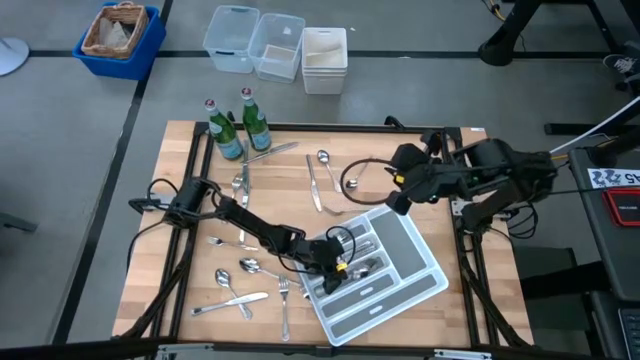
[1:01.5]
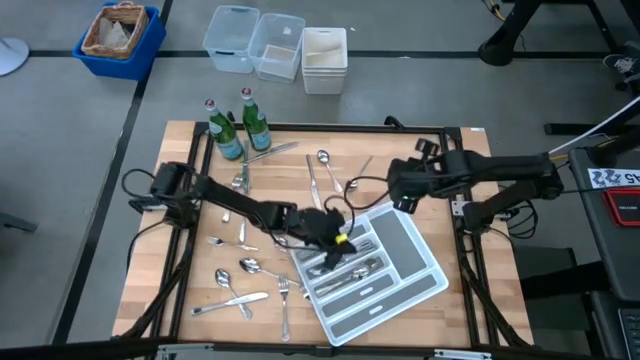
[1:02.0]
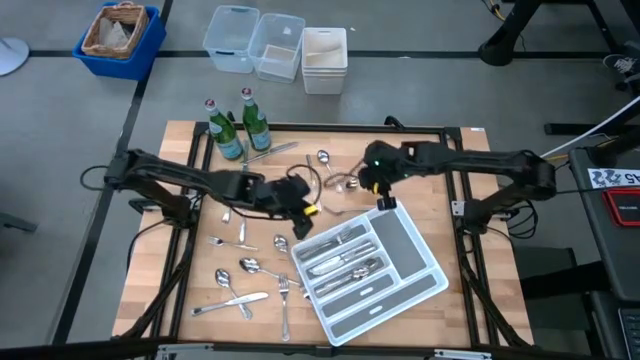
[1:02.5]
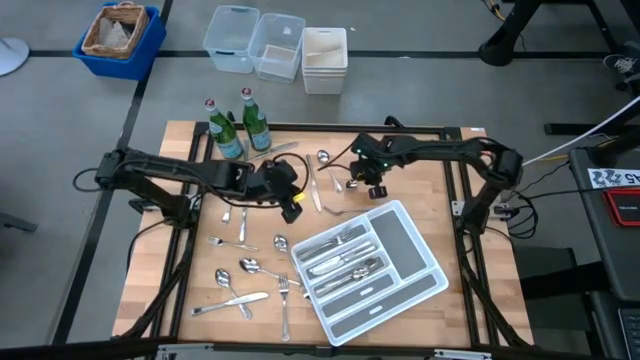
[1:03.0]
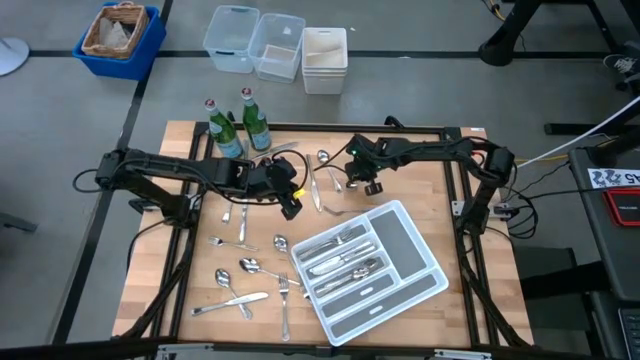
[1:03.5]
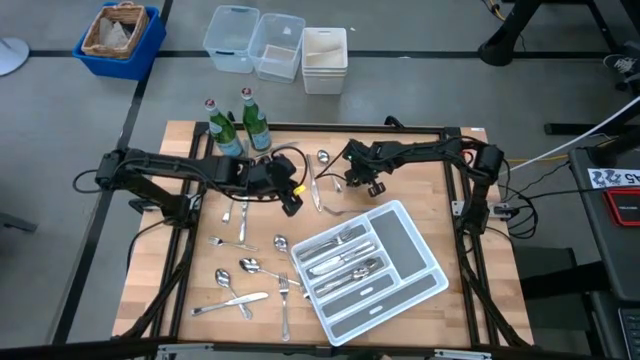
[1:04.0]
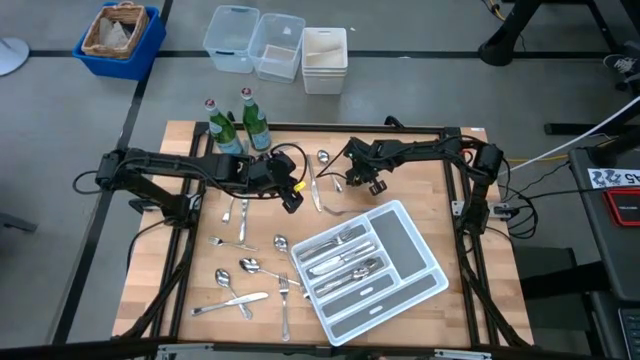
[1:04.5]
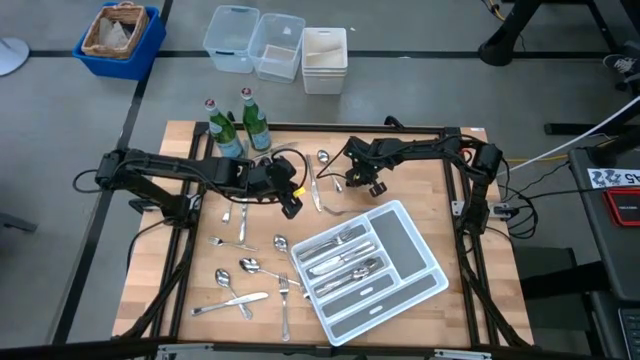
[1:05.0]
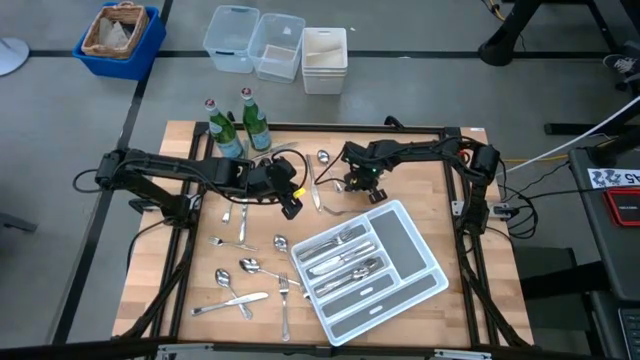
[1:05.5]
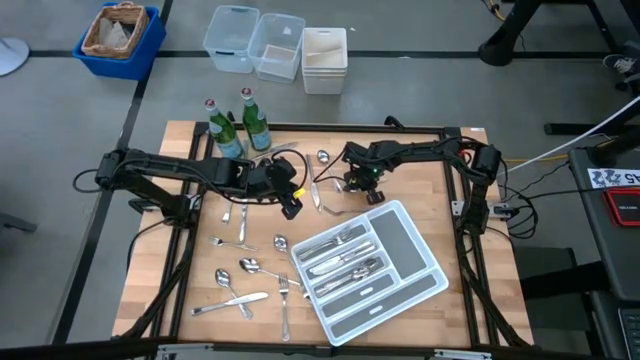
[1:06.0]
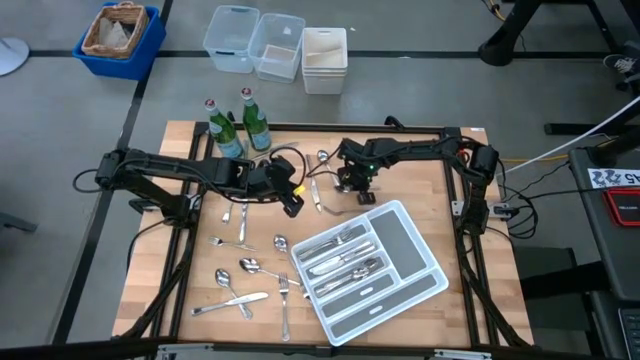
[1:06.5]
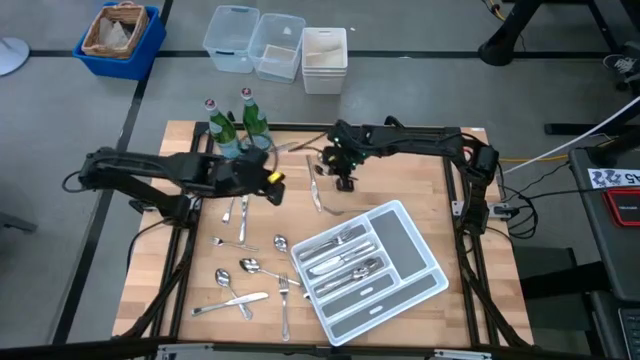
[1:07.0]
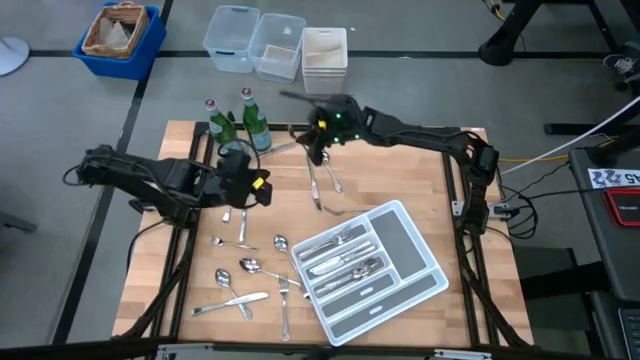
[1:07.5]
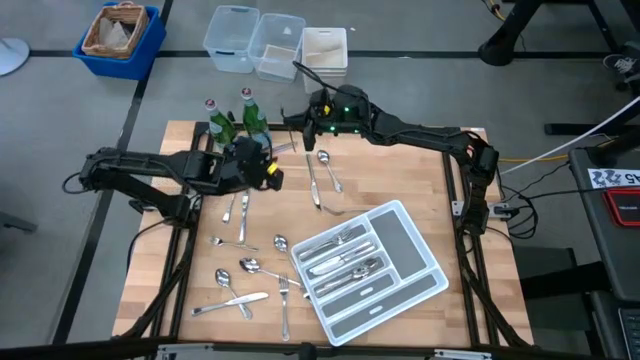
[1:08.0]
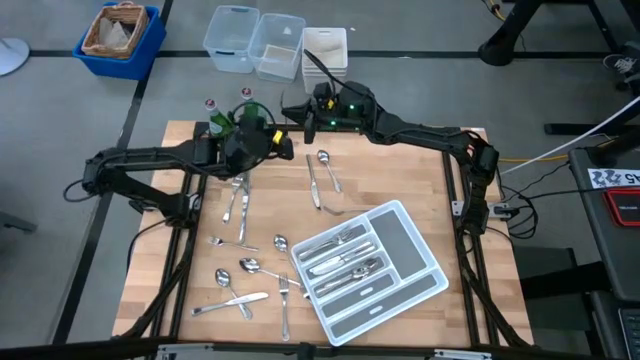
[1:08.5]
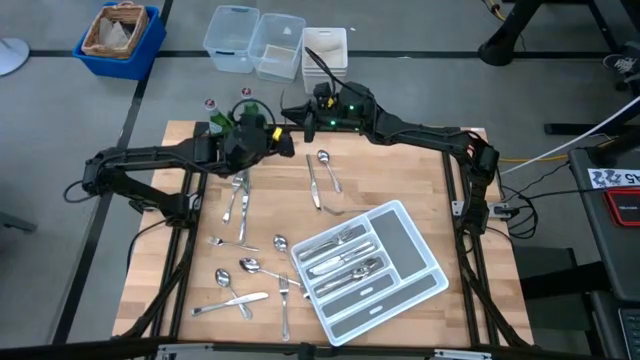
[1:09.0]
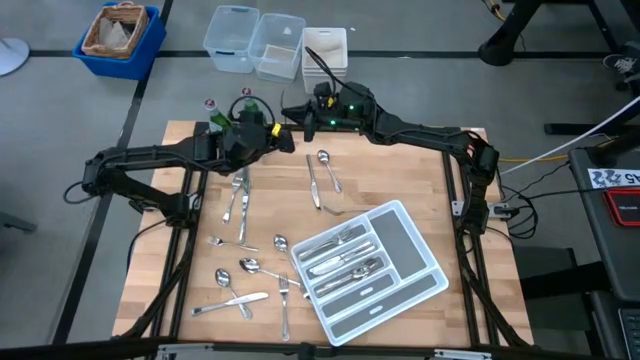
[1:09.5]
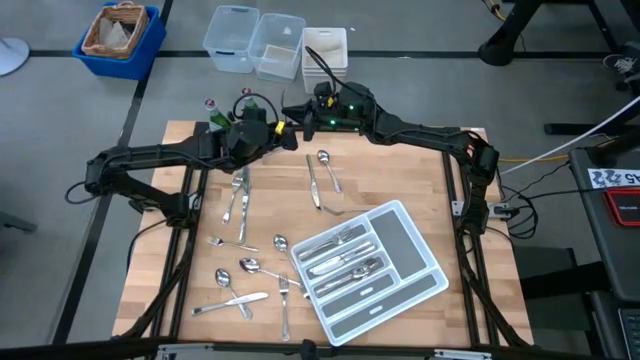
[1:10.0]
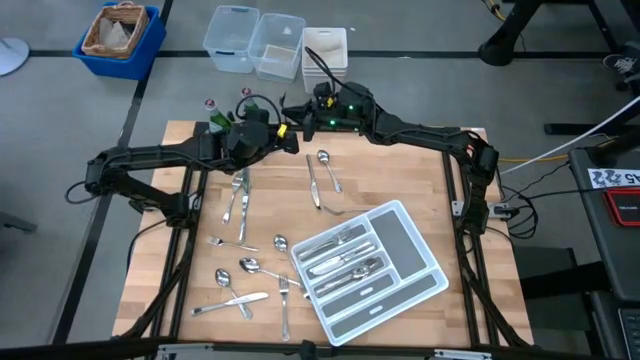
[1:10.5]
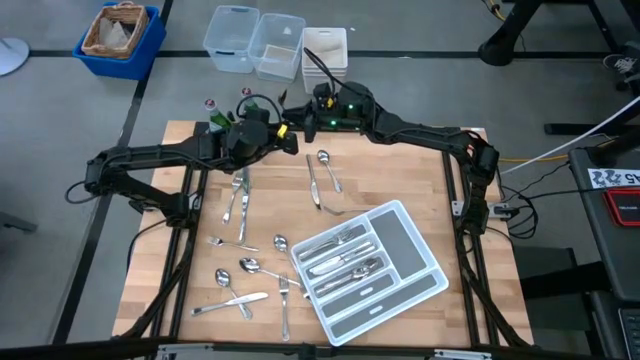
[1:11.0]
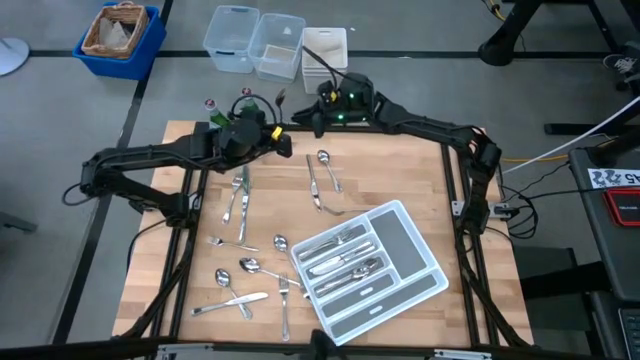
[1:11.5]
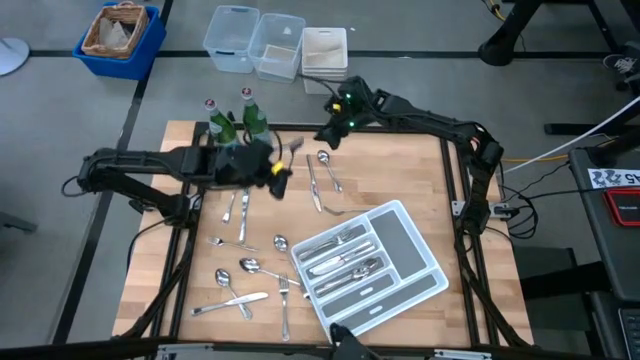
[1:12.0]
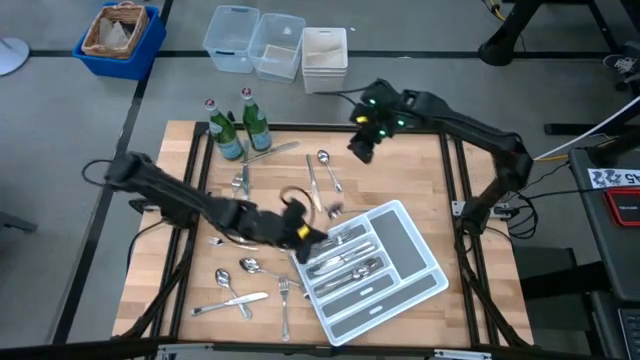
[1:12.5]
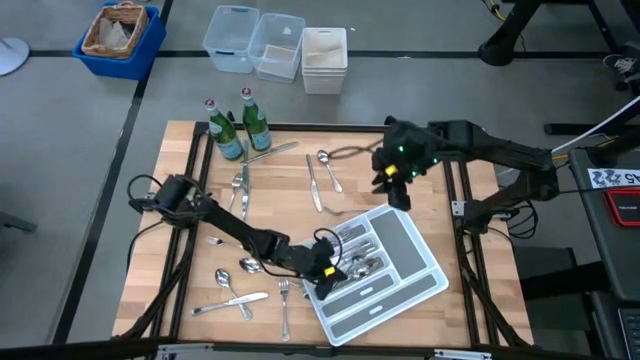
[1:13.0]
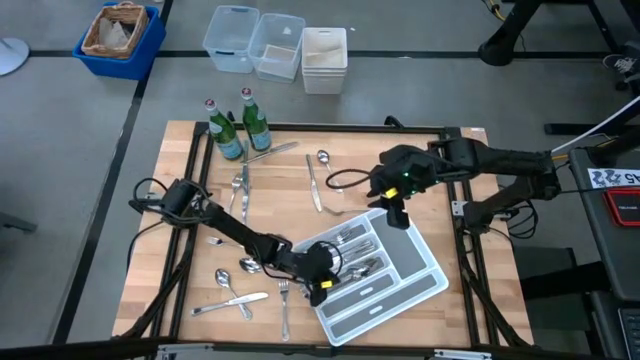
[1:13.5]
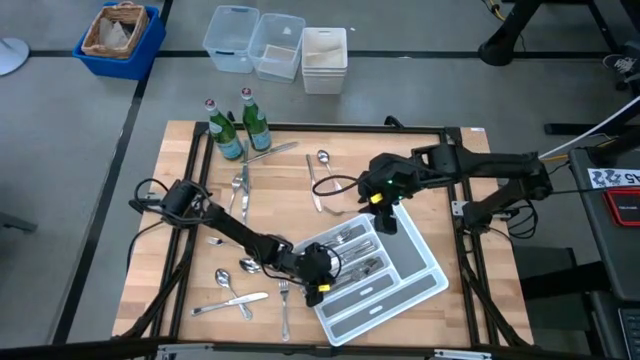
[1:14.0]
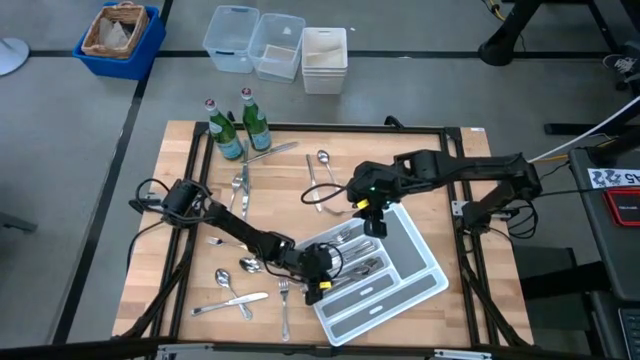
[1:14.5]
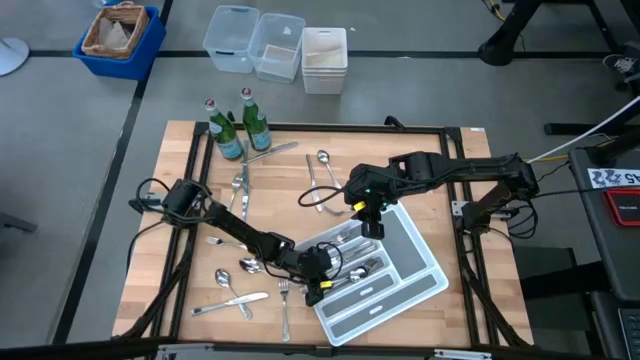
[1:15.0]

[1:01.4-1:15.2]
Task: Sort silverware
Put the silver spoon into the white silverware tray

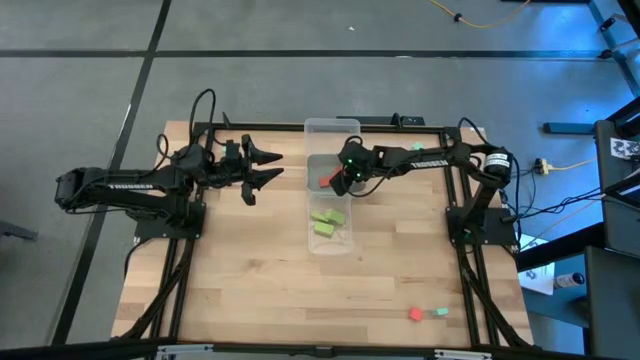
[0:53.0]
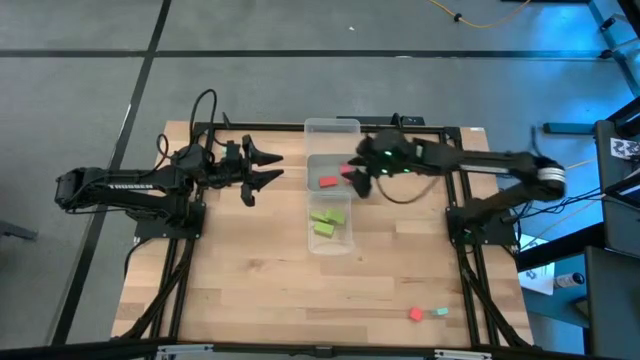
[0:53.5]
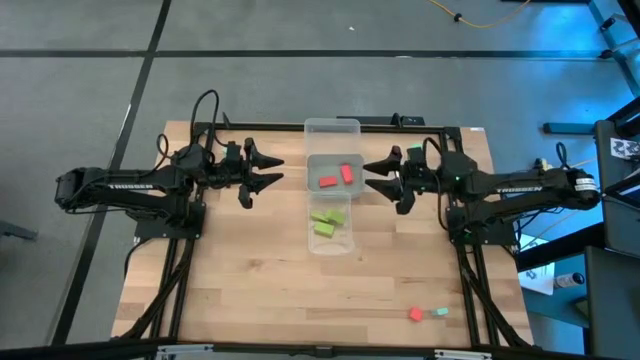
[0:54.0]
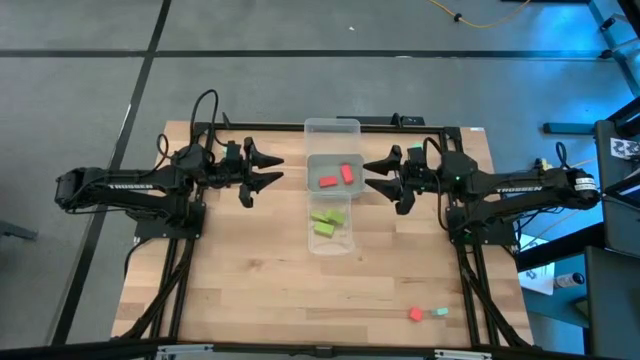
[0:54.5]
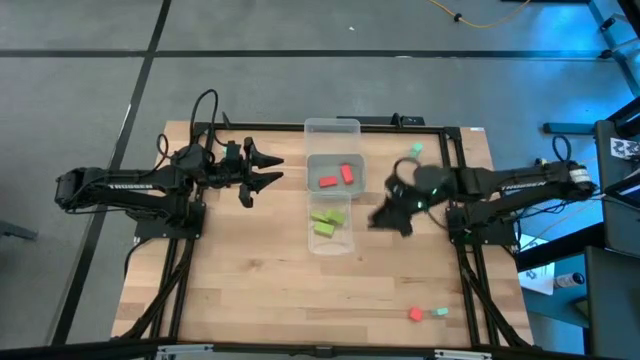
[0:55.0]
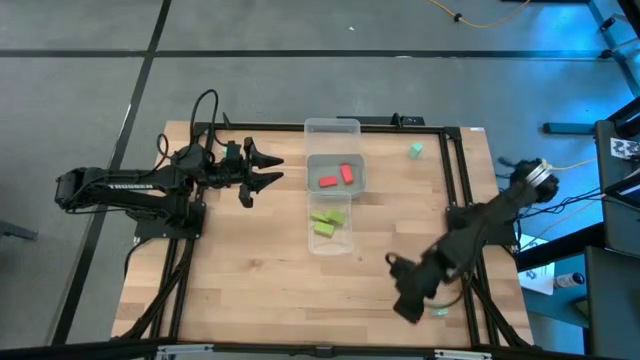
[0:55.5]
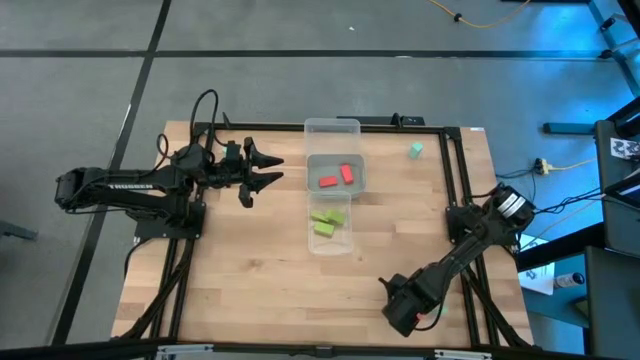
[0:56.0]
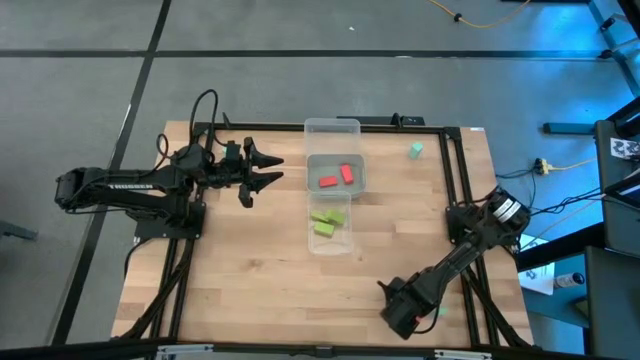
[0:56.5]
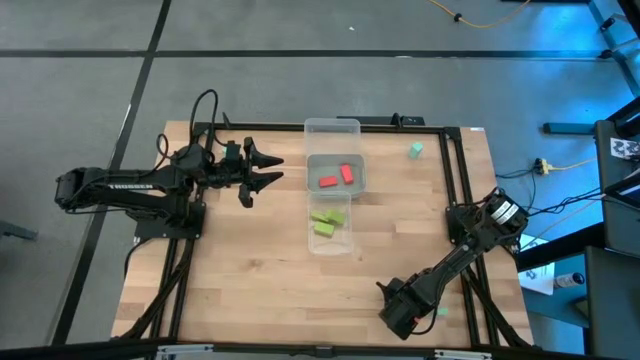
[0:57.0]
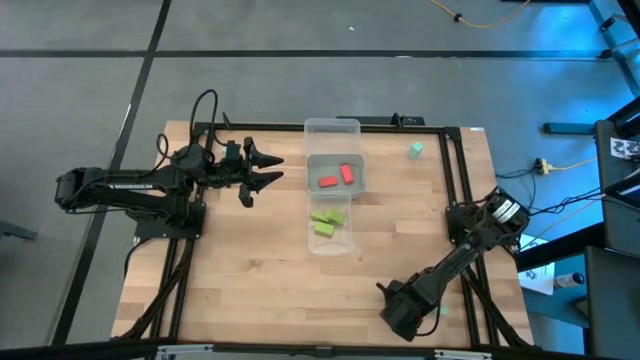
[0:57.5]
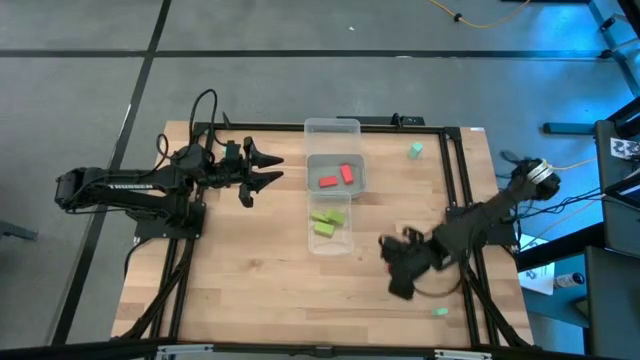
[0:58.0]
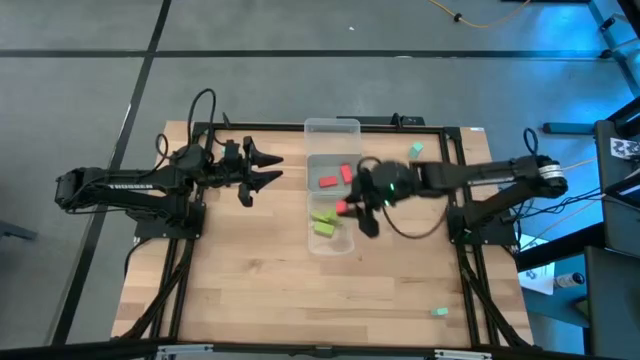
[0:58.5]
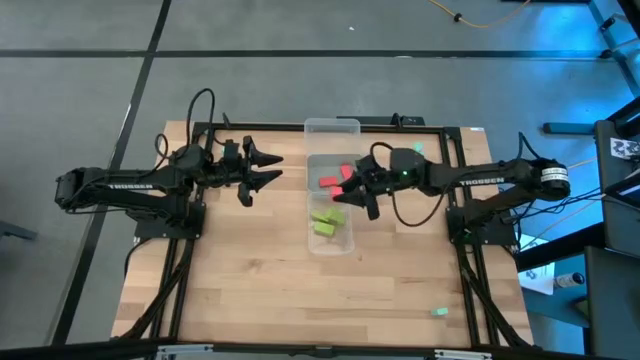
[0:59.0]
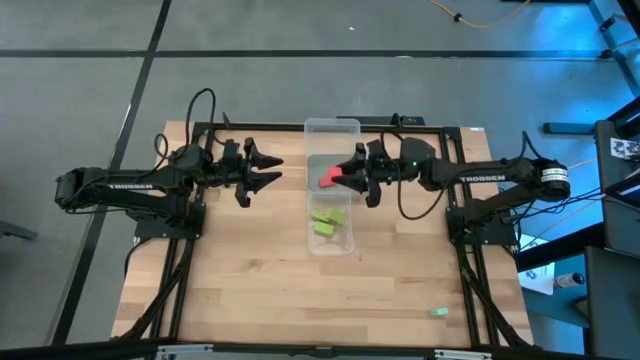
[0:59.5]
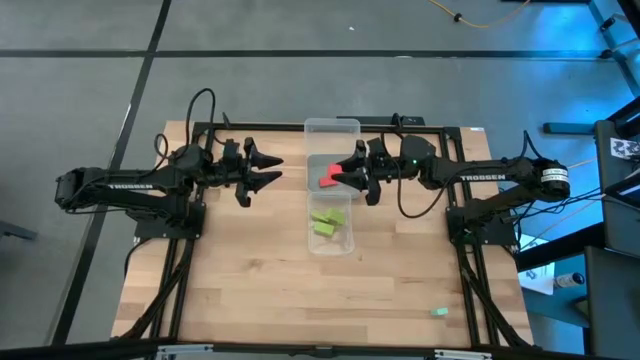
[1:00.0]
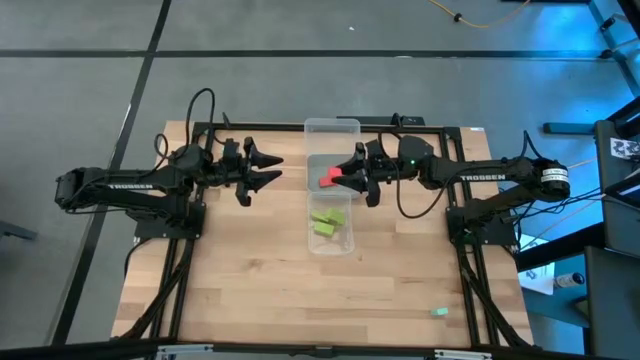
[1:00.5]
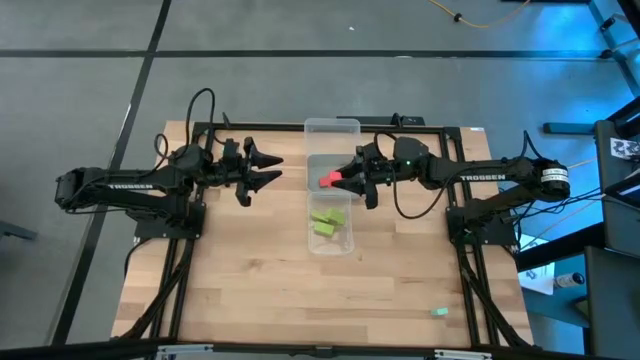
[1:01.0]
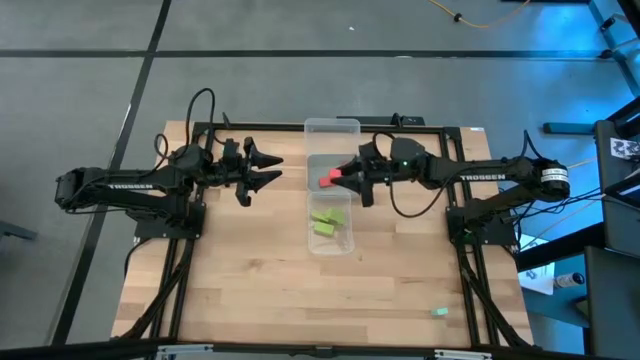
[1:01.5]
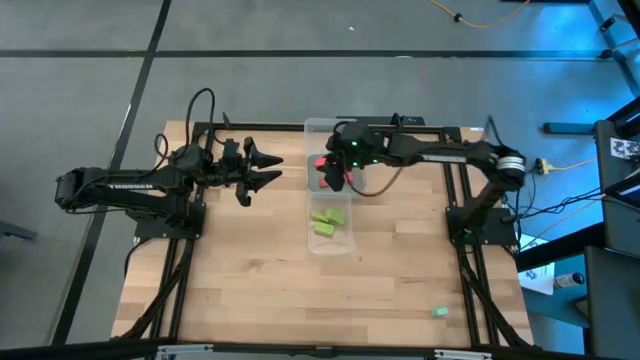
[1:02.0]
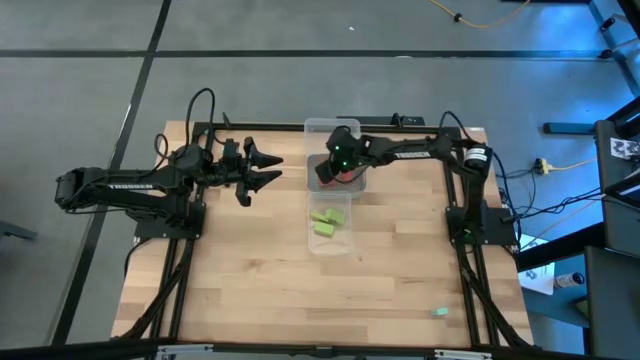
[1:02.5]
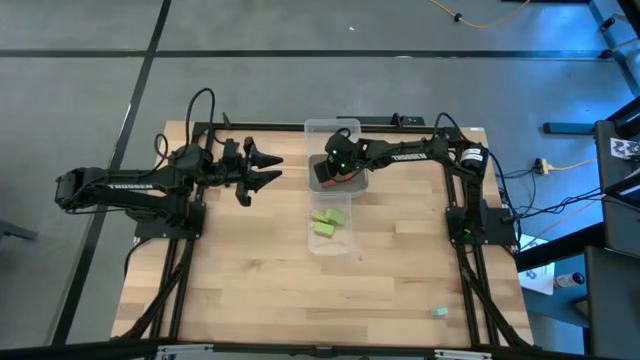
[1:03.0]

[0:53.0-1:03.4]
Task: Sort & place blocks by color
Put the orange block into the gray bin
